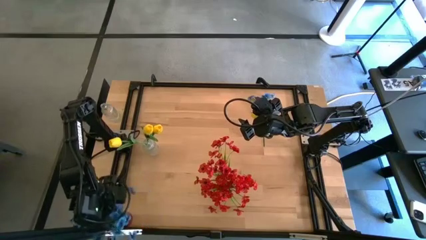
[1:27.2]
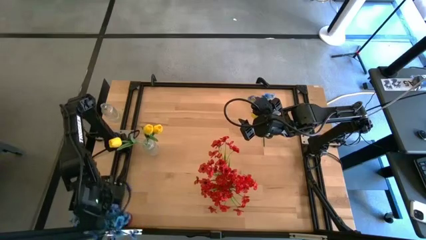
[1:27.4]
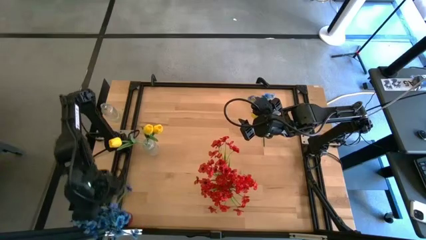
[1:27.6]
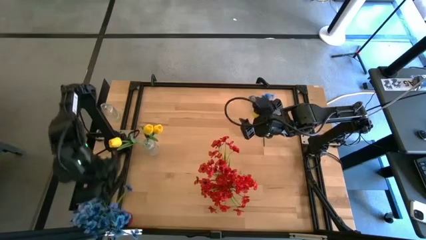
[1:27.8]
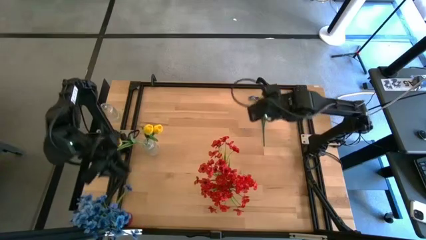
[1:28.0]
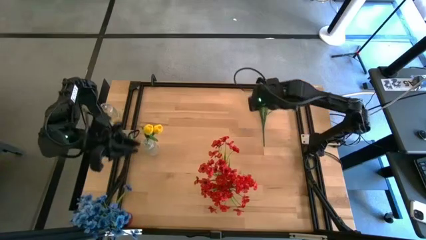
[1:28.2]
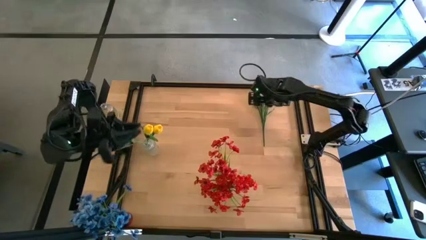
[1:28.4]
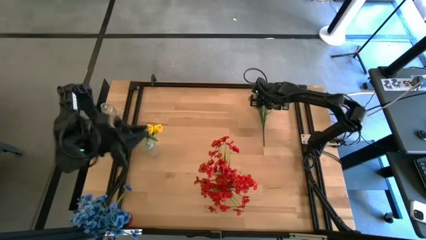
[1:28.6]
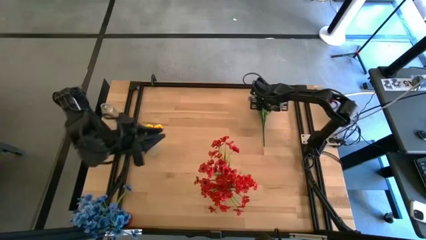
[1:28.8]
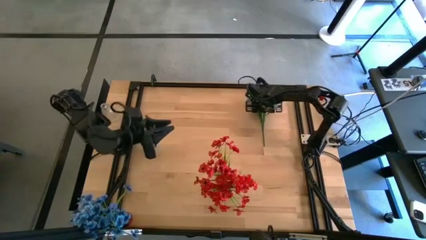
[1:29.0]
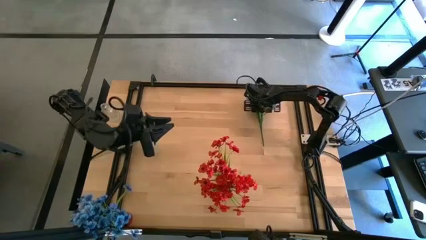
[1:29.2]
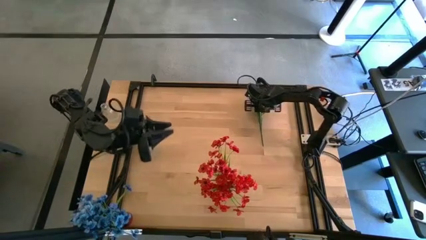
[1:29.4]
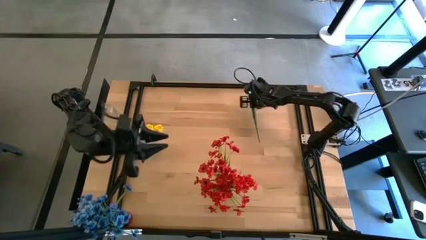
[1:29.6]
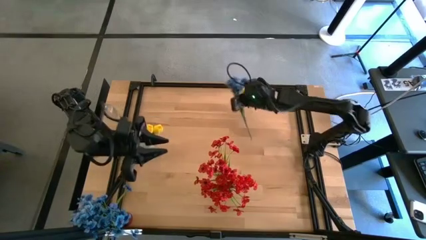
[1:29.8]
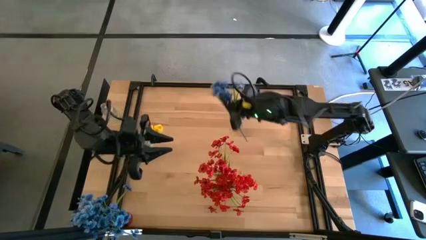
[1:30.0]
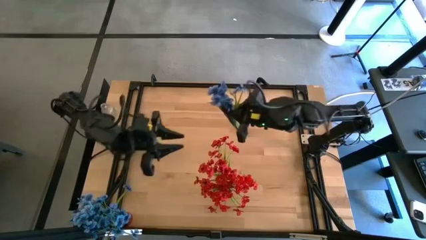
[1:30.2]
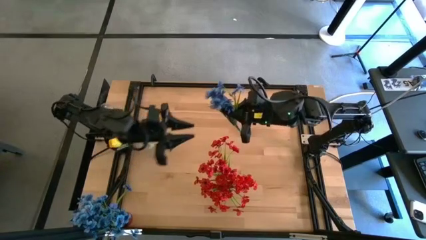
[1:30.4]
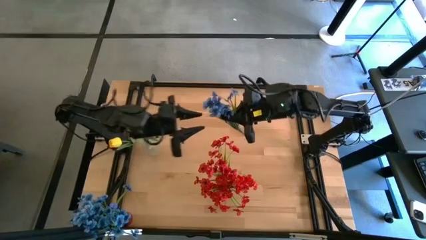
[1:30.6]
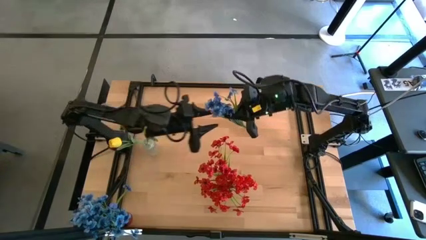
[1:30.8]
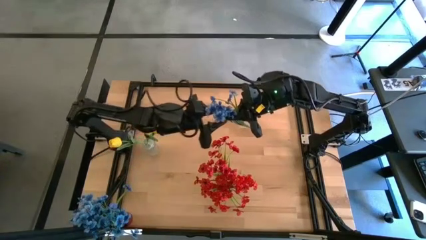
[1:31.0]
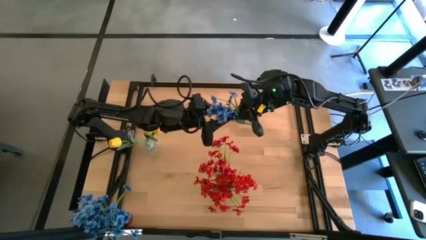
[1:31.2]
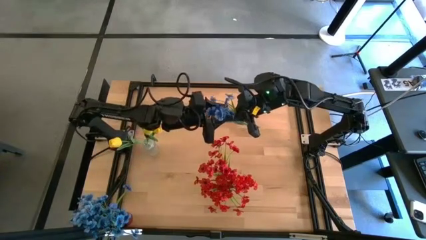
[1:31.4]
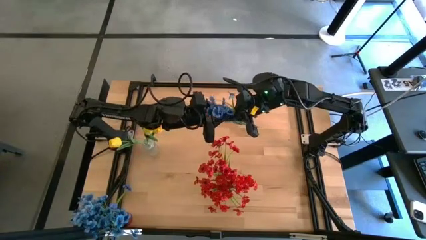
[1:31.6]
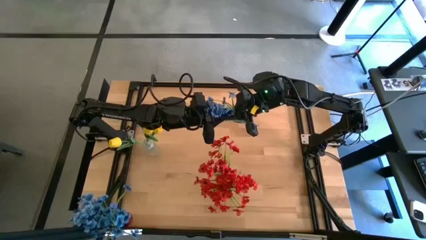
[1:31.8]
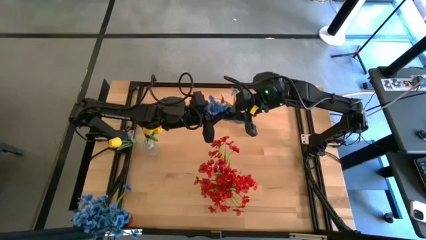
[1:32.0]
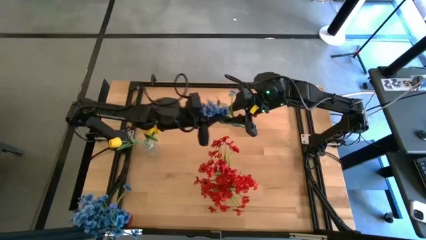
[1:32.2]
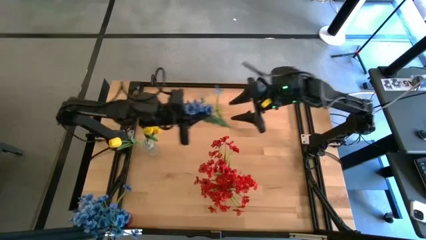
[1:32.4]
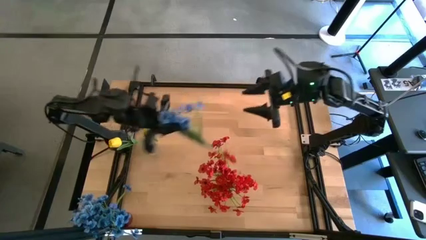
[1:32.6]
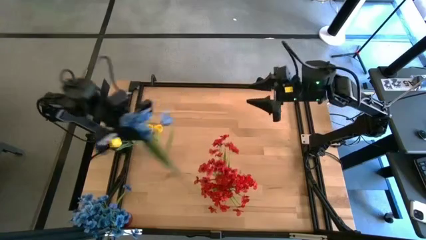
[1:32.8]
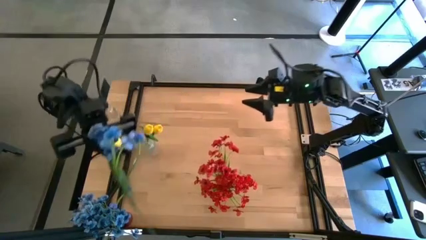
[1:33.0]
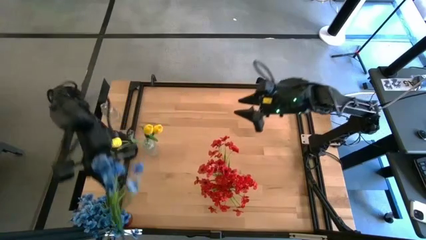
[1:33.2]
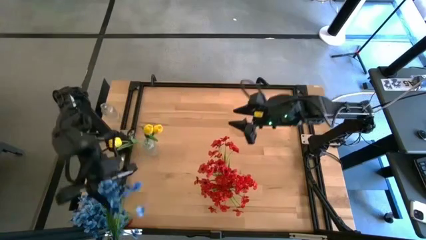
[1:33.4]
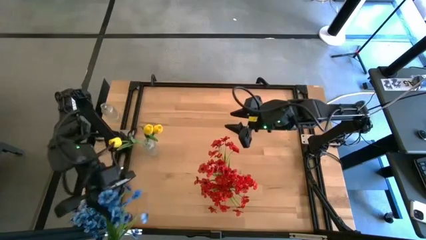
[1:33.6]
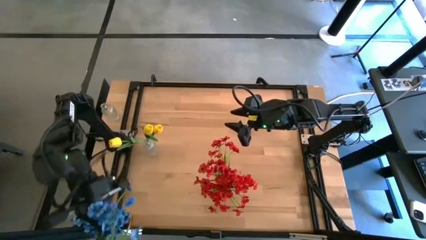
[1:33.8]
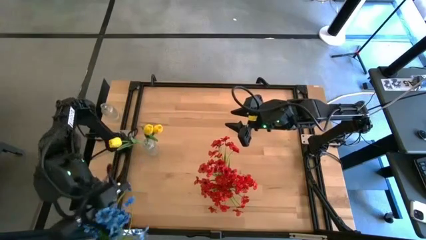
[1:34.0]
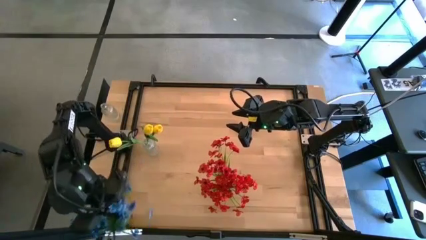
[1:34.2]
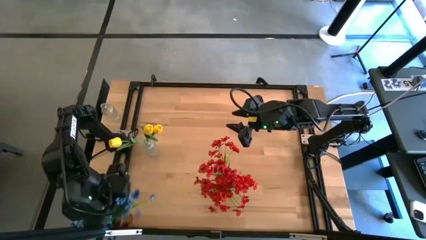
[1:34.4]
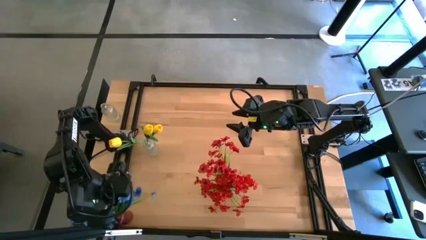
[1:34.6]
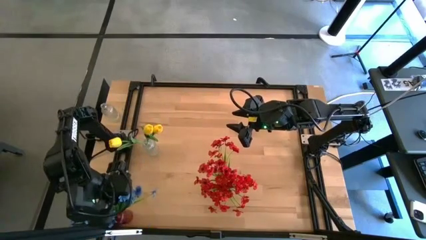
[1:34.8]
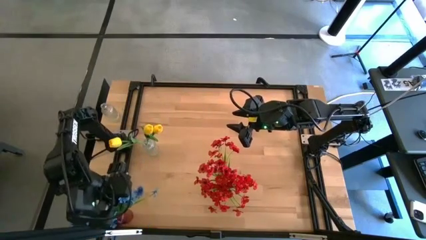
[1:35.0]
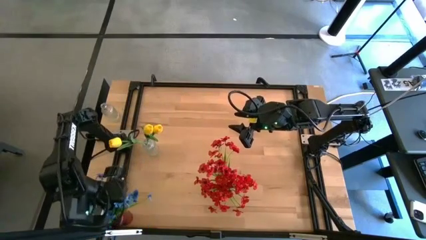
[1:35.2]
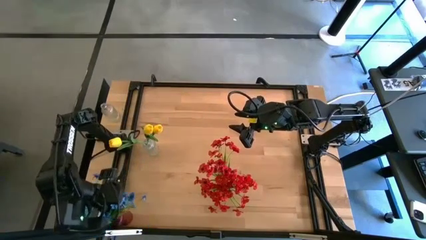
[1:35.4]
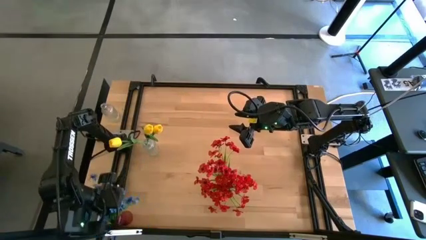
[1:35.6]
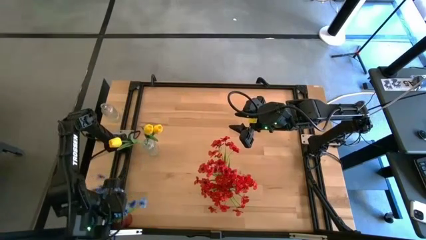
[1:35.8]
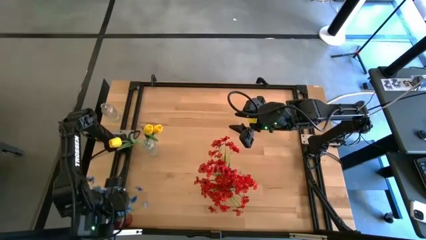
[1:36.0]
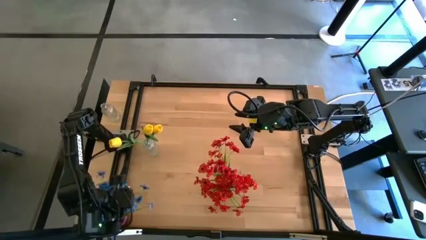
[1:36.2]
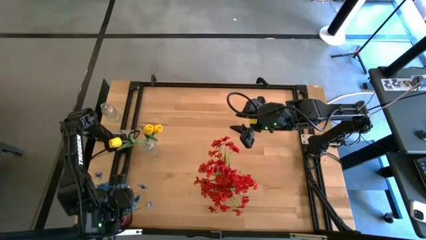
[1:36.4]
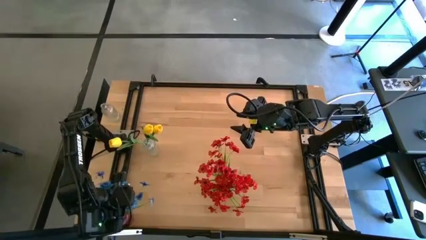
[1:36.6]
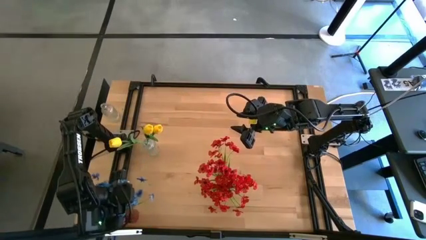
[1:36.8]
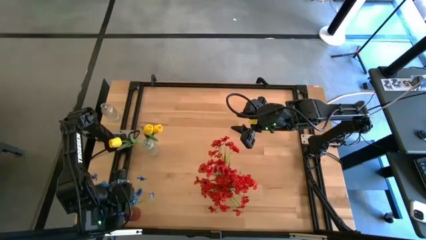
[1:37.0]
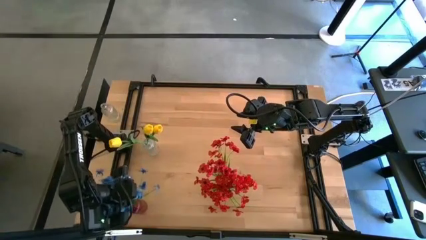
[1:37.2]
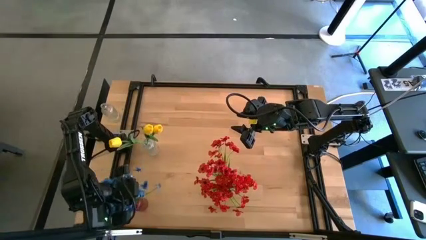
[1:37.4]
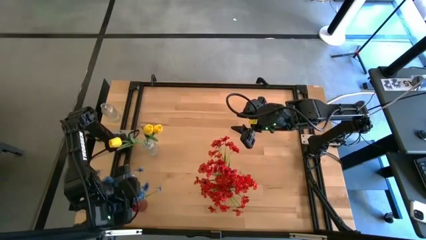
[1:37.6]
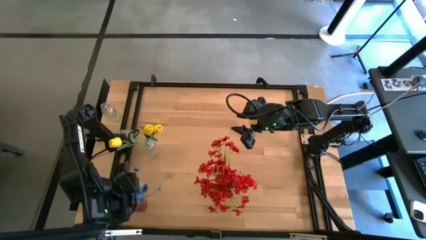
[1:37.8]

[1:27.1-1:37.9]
Task: Sort flowers into vase by color
Put the blue flowers into the red vase

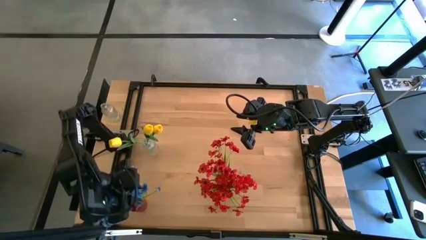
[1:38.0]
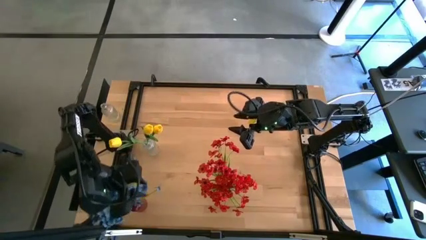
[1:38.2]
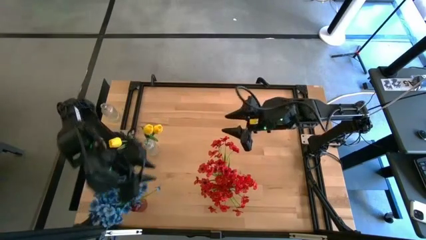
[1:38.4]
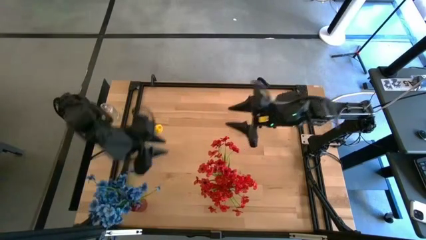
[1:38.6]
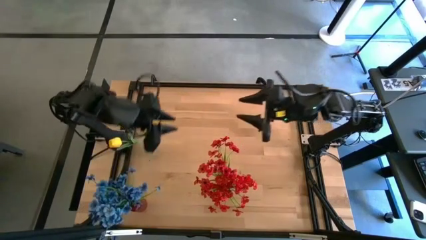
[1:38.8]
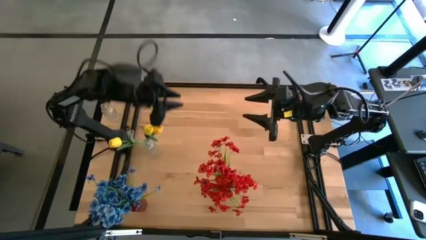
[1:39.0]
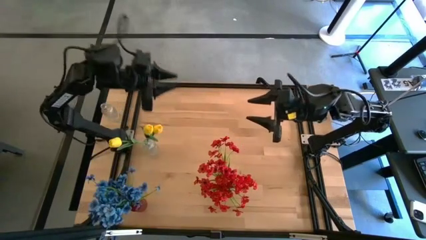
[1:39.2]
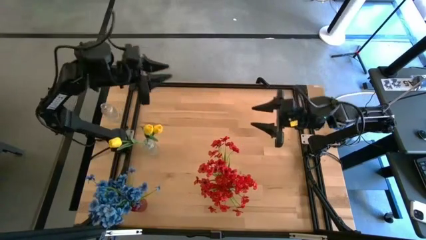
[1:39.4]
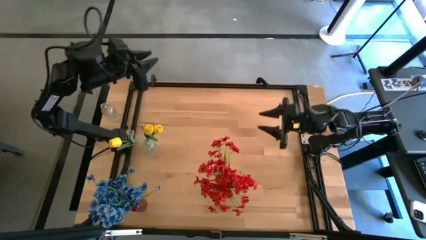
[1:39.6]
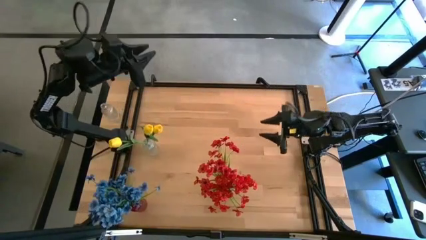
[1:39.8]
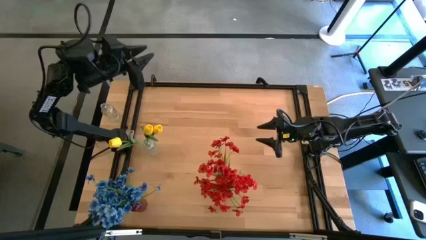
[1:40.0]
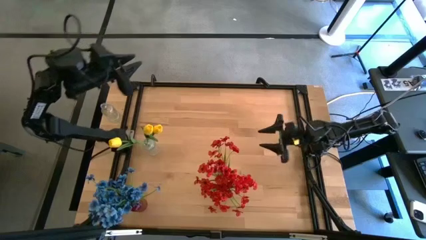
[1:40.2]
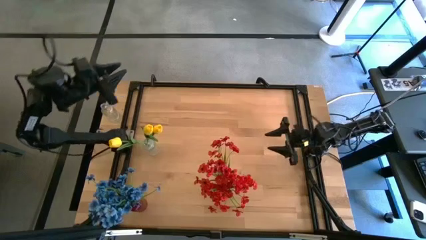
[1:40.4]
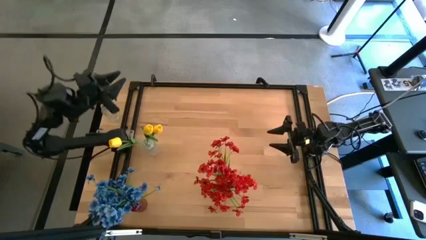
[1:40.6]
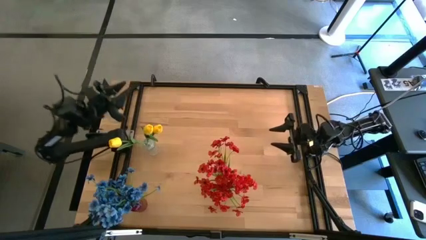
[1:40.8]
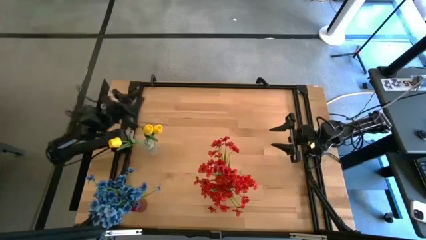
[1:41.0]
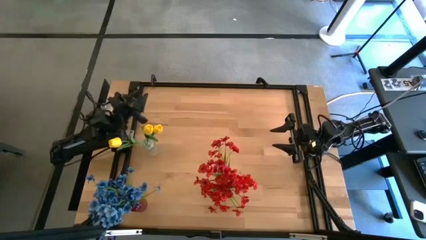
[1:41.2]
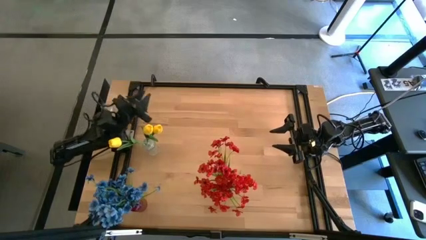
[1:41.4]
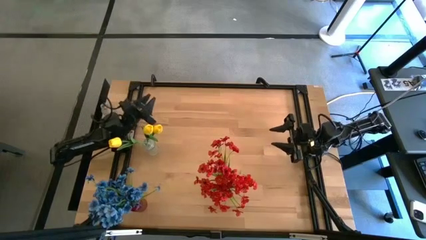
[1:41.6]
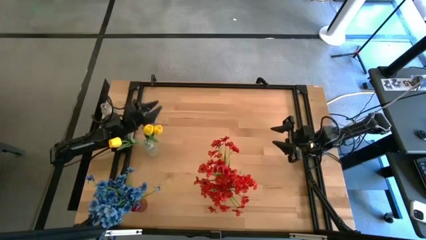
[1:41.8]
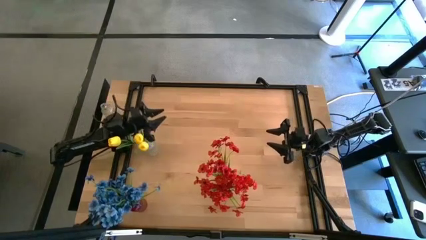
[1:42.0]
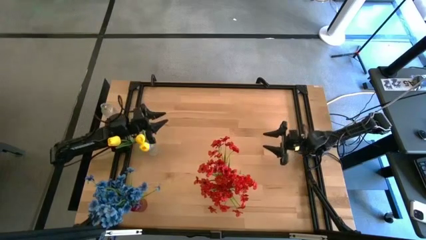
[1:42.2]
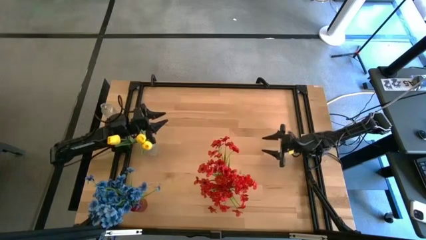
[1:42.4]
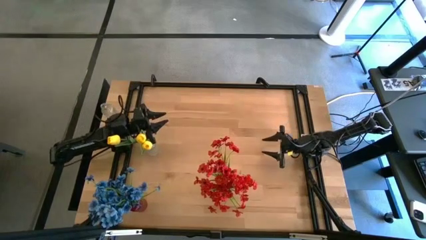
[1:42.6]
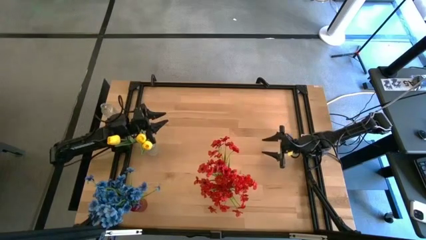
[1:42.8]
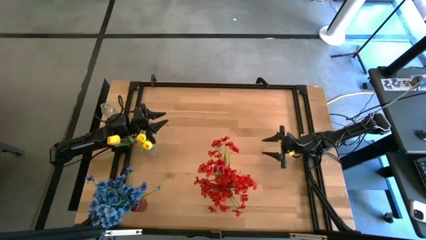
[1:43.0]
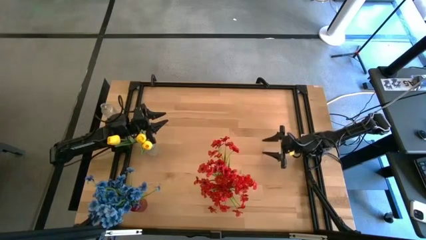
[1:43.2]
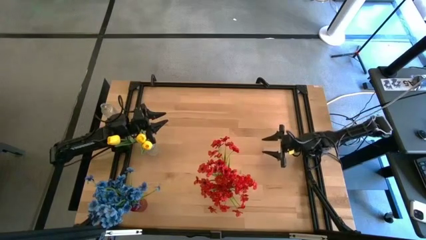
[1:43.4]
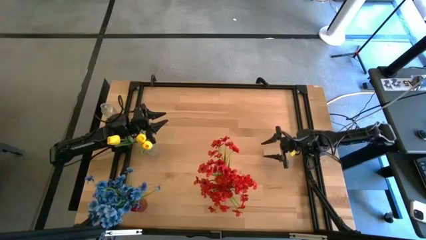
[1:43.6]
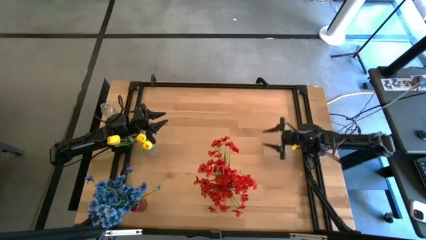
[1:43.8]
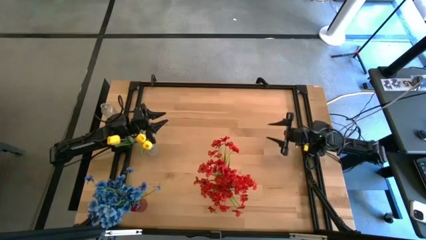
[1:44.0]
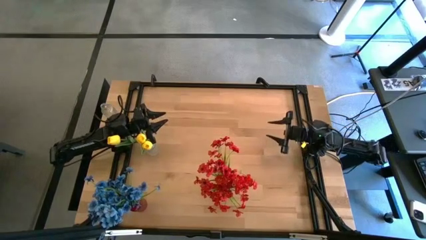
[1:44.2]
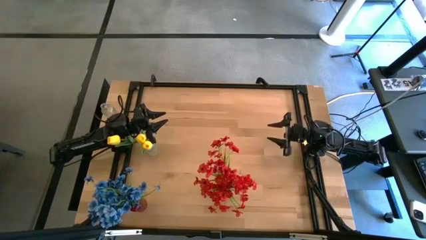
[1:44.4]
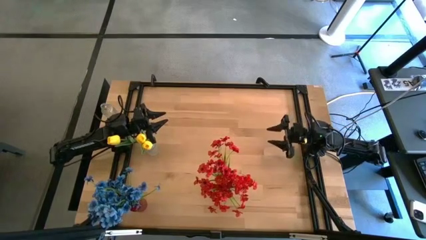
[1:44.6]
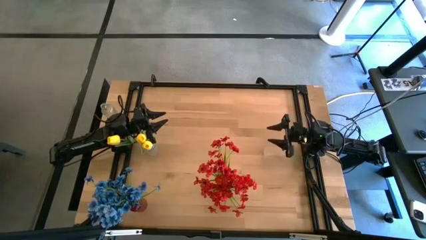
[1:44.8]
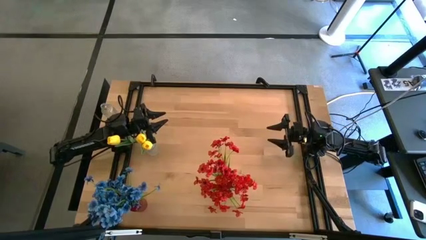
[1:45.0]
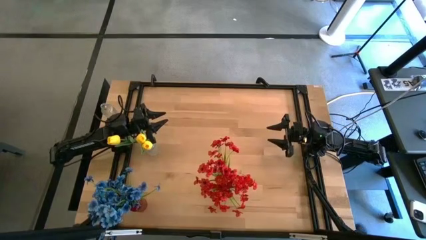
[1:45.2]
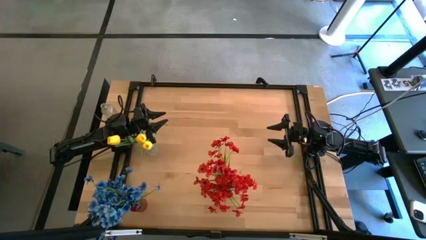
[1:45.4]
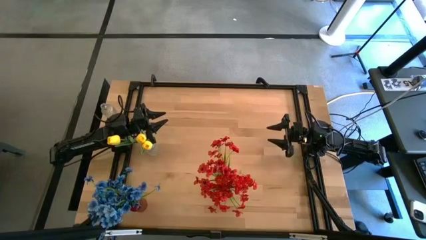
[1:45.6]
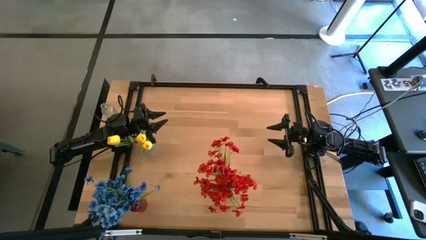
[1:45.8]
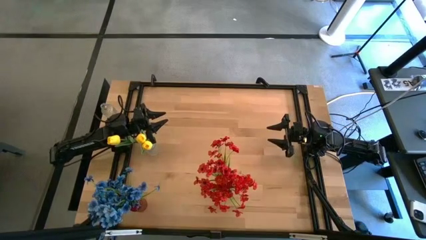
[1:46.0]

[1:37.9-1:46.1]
Return to Home Position
